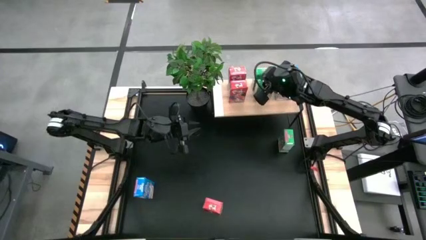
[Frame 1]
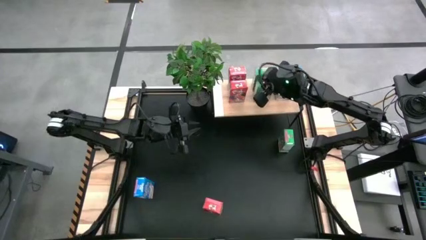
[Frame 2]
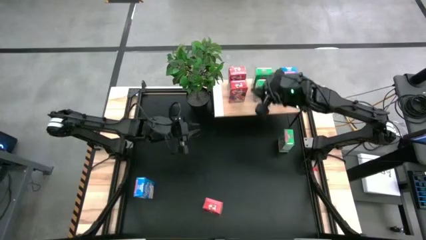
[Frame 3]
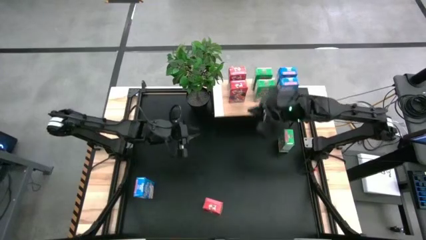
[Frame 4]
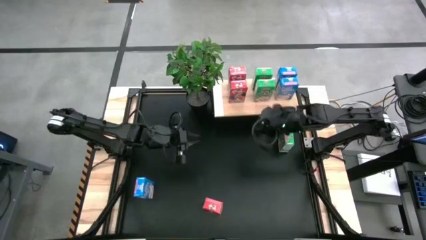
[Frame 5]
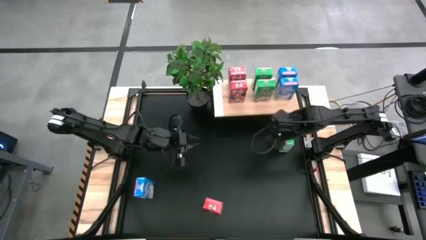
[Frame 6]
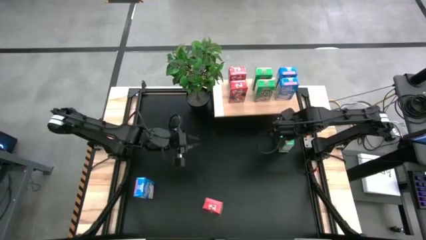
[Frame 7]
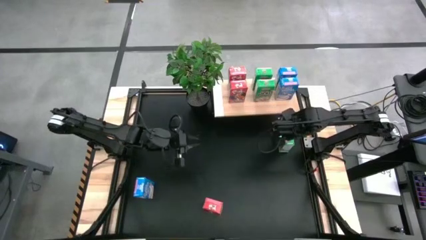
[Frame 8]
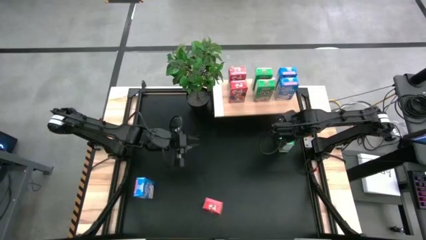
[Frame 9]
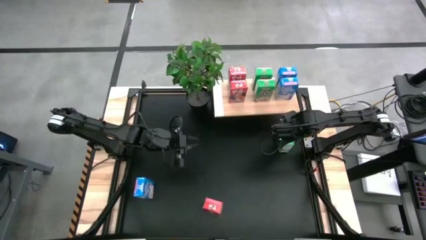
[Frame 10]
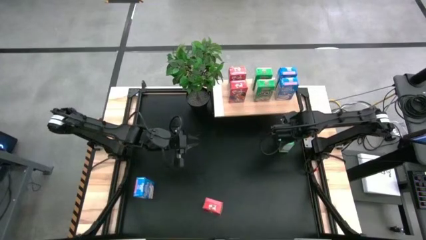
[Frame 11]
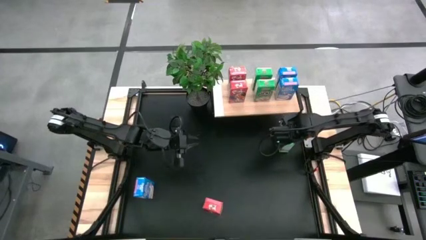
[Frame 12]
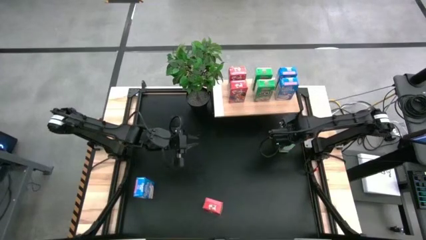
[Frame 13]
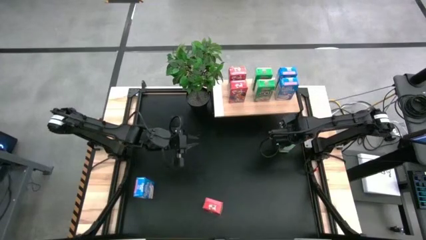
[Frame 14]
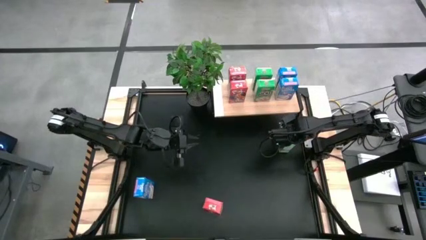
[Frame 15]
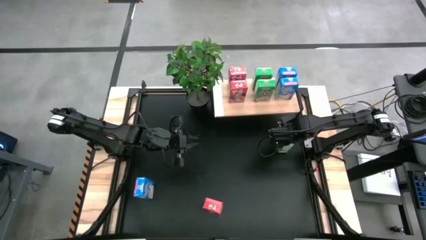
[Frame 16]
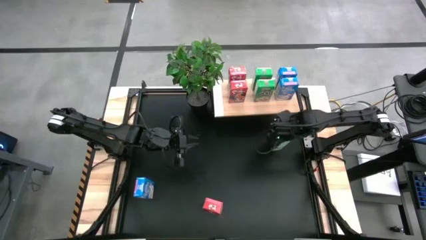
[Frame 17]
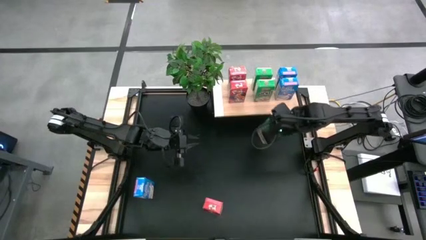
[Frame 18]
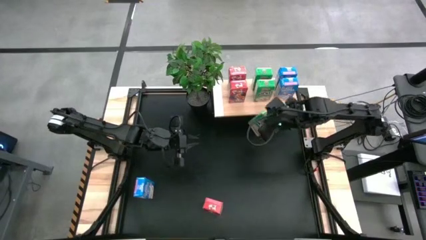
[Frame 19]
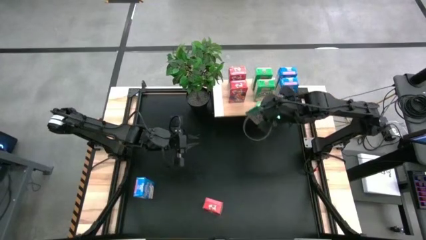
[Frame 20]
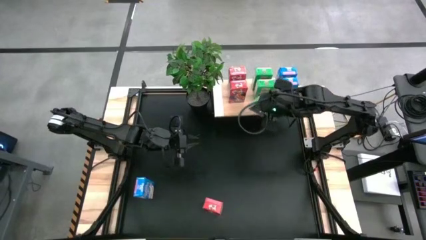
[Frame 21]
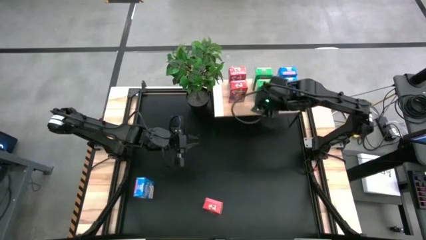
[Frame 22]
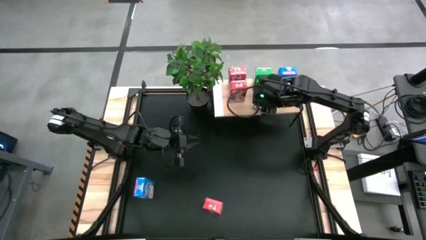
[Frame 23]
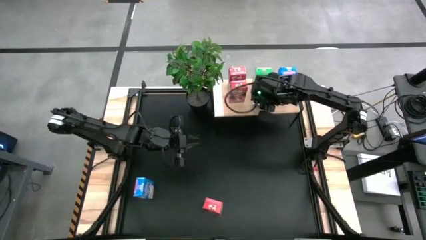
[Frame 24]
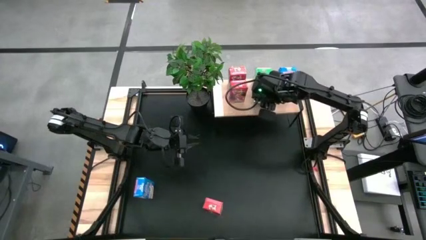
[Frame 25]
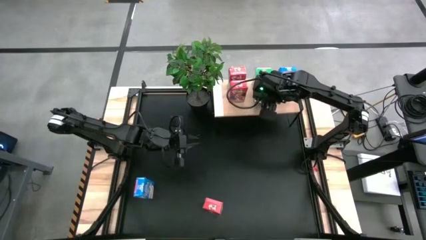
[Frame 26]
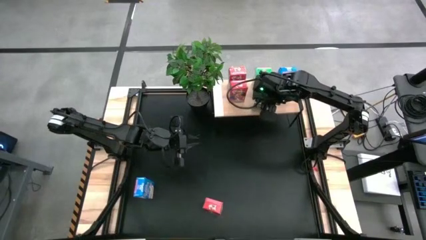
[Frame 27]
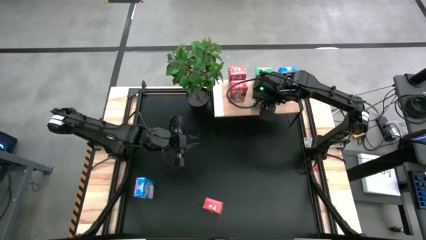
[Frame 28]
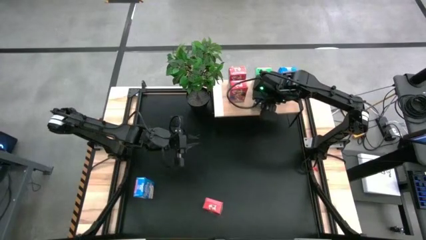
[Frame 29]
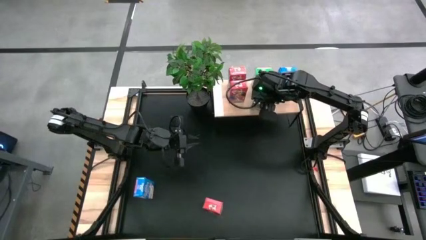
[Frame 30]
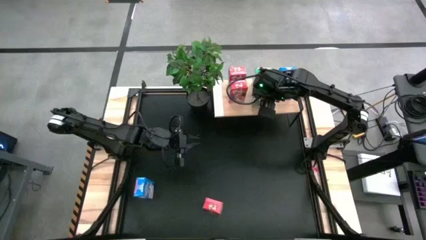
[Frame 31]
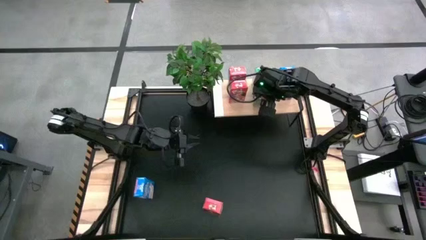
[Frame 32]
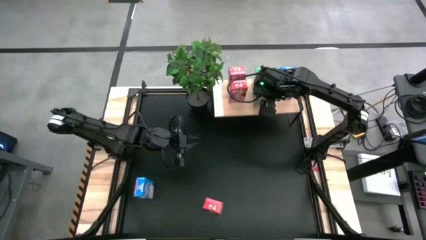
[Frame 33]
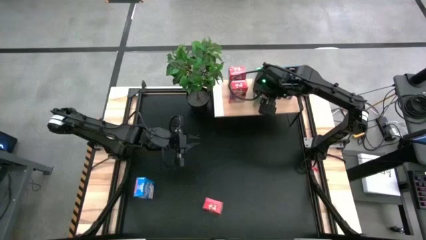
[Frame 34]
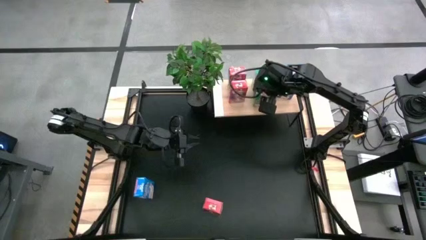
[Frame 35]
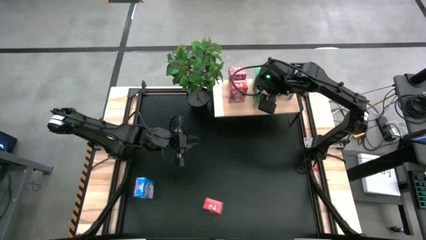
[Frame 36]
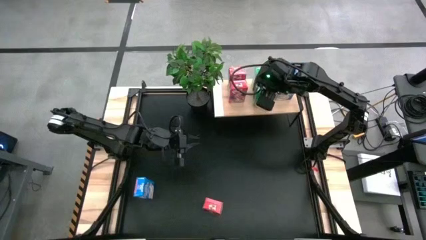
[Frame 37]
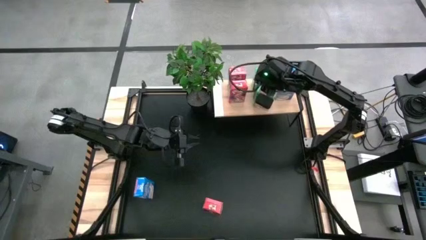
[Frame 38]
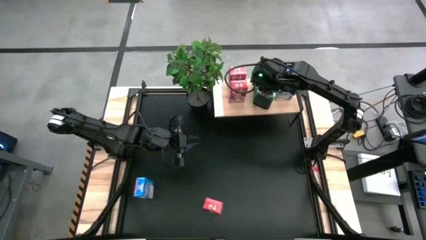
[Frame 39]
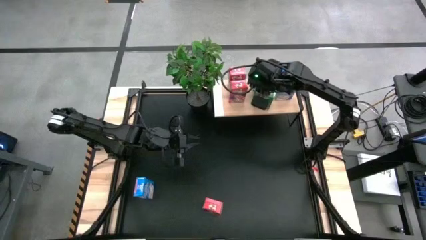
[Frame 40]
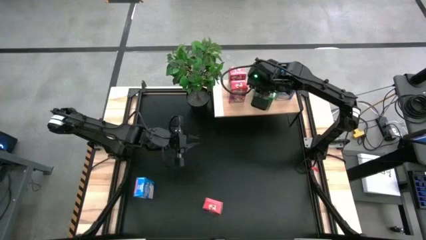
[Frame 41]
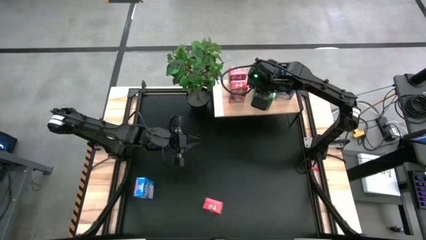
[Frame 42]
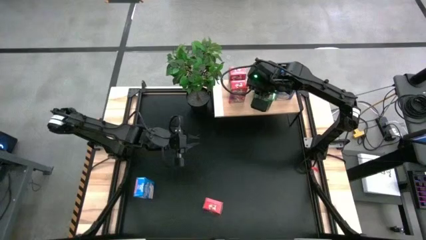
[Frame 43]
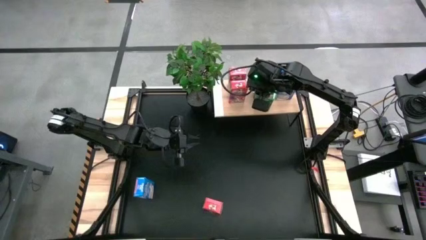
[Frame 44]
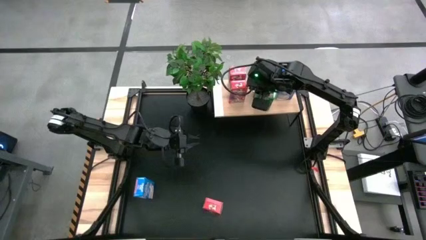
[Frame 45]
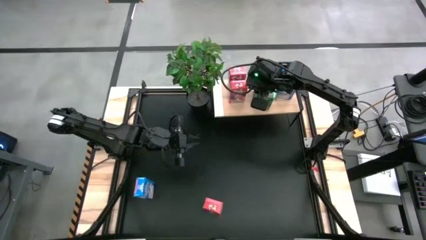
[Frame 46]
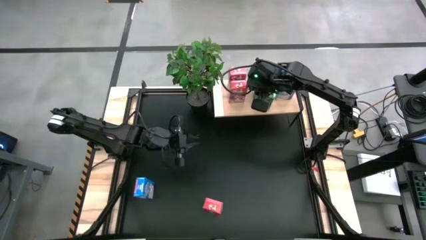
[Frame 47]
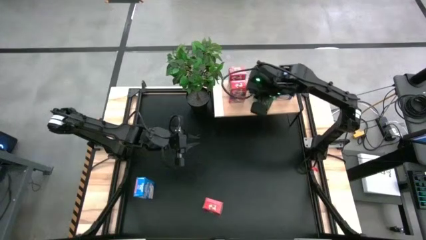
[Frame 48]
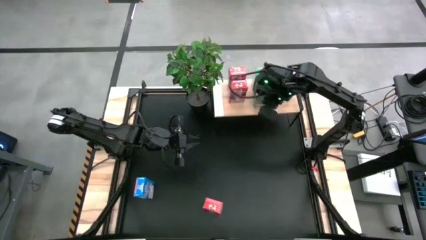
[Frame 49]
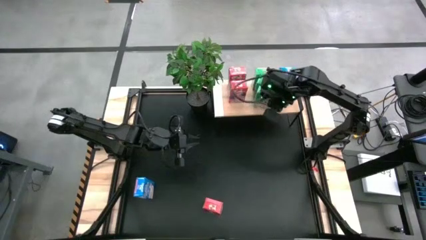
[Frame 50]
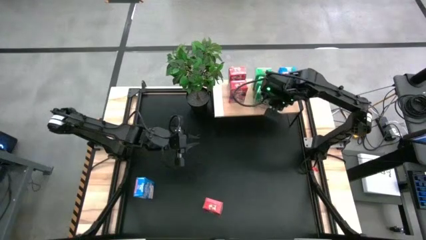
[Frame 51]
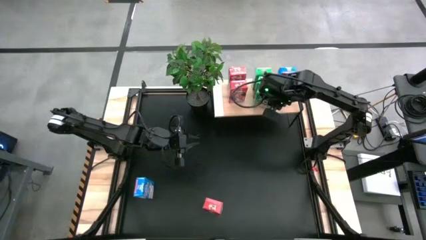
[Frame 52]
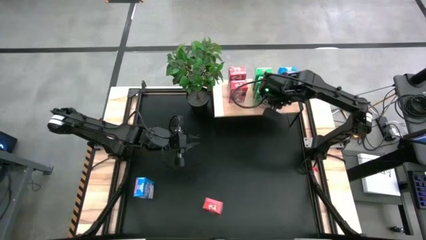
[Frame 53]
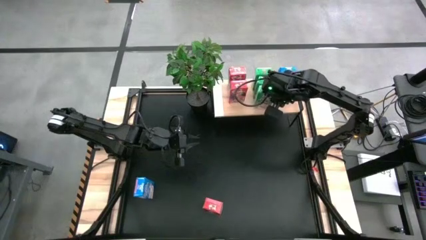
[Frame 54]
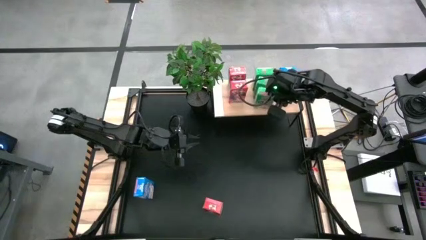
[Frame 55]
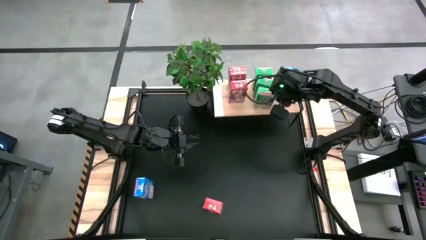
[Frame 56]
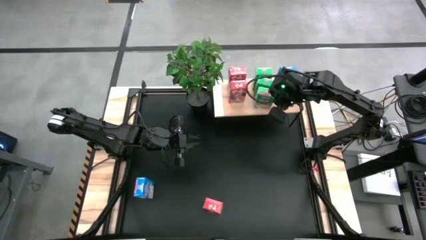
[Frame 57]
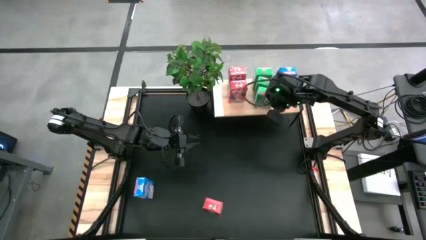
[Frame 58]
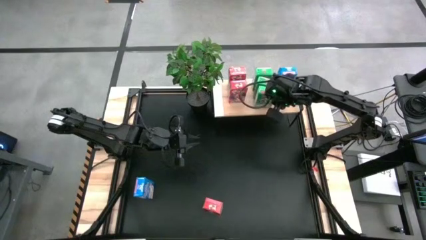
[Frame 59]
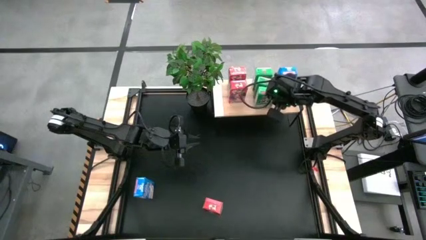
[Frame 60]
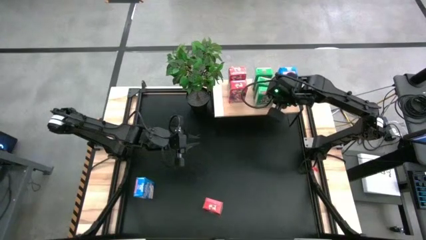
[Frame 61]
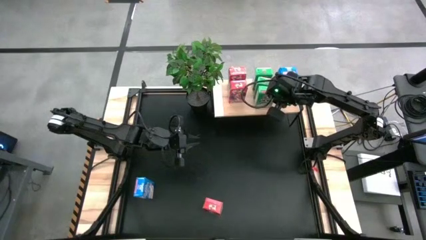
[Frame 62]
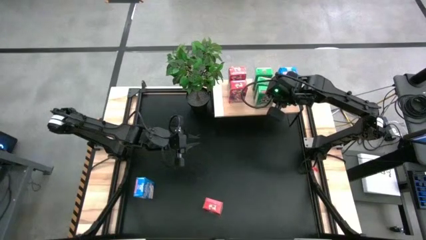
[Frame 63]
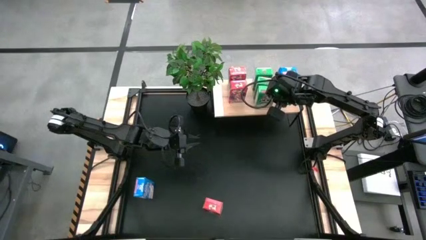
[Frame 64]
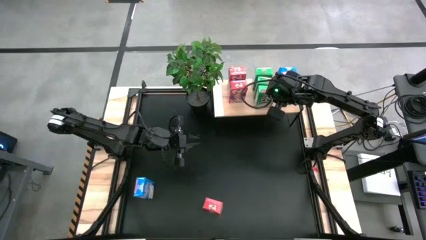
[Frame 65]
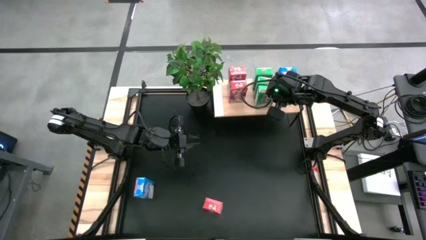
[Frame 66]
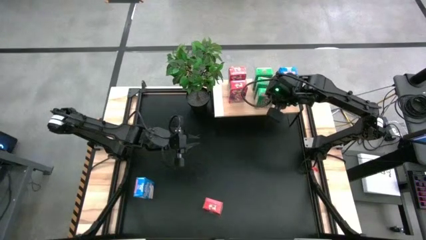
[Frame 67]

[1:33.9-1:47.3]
Task: Stack cereal on shelf
Put the green cereal box on the shelf

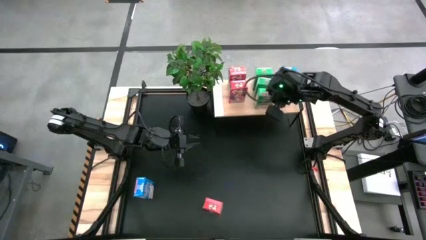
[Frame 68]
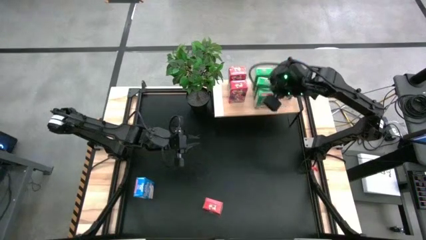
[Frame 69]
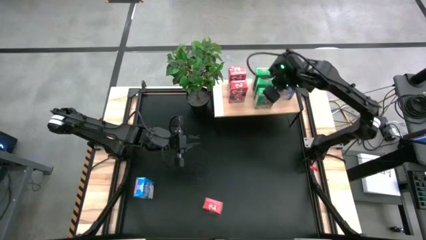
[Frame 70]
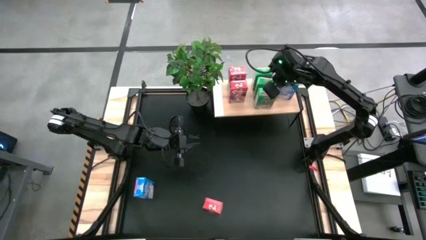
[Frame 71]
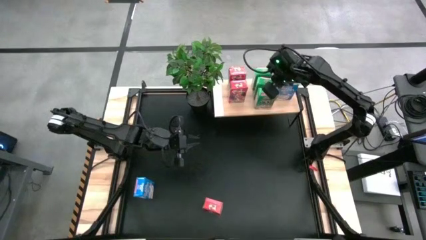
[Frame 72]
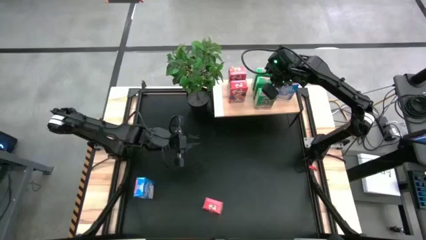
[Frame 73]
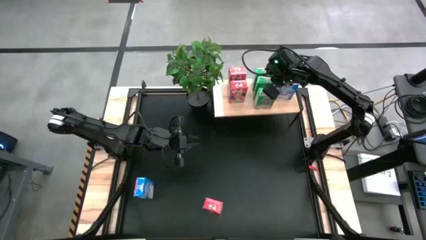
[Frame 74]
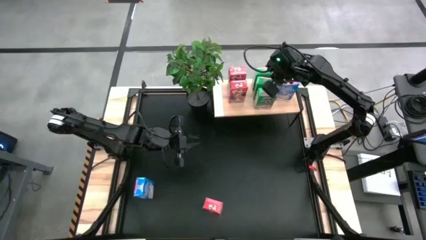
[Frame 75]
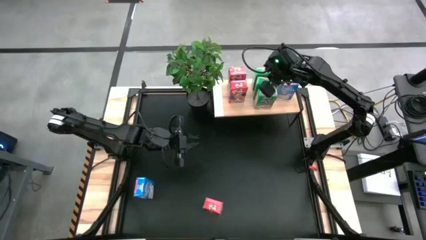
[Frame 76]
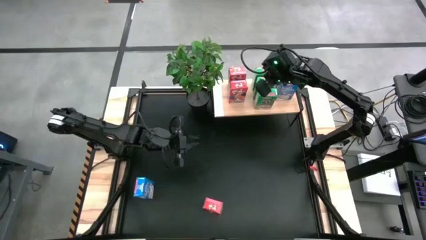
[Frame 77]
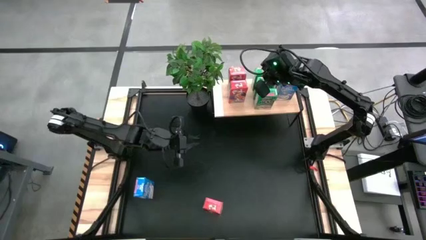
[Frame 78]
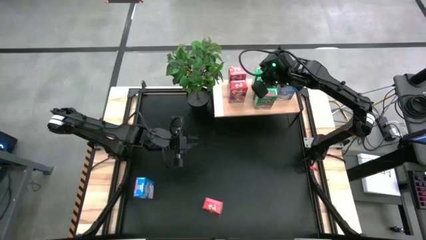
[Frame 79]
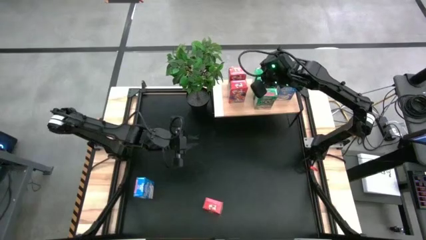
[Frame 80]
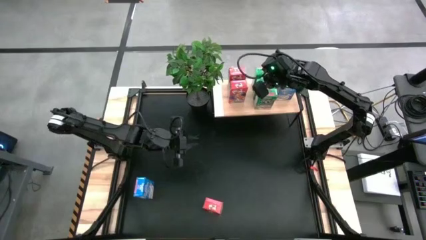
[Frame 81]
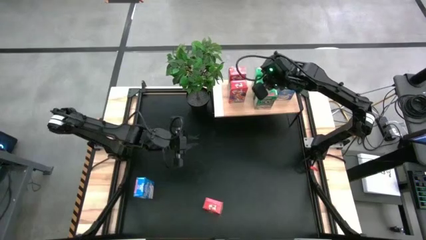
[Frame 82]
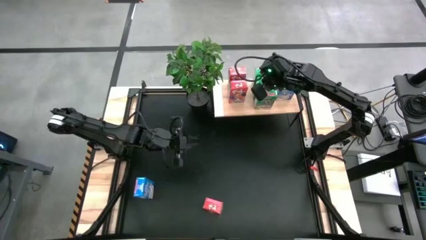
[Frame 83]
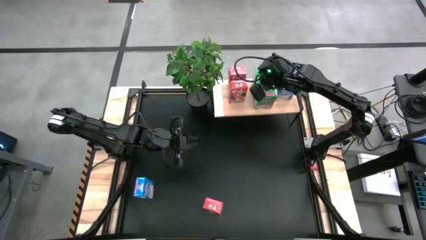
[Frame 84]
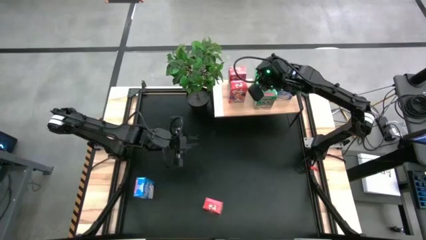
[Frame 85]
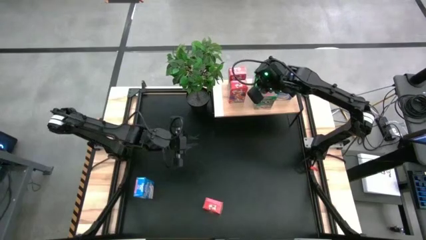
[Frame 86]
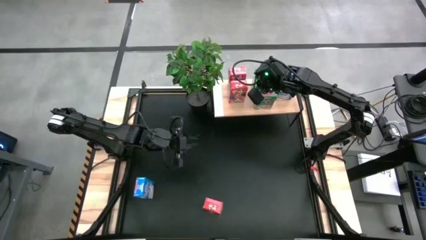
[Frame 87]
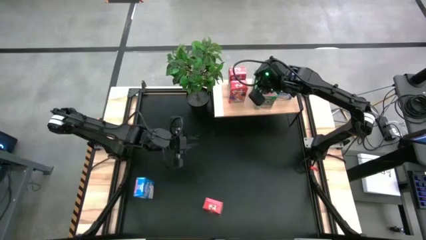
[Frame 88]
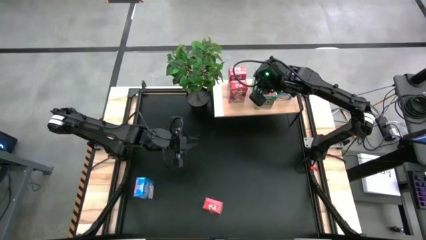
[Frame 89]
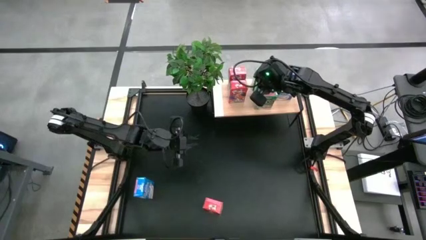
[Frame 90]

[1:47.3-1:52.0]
Move the middle green cereal box on the shelf
